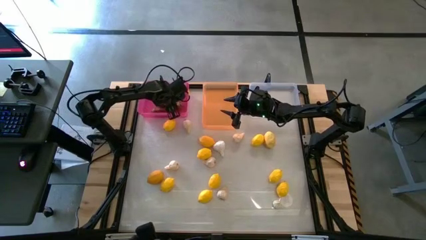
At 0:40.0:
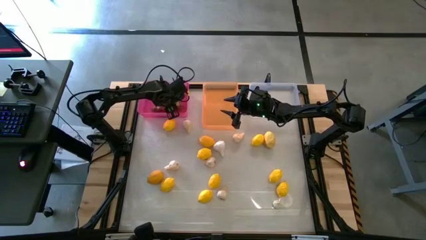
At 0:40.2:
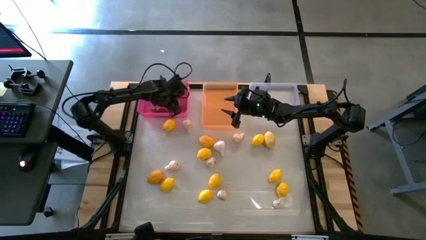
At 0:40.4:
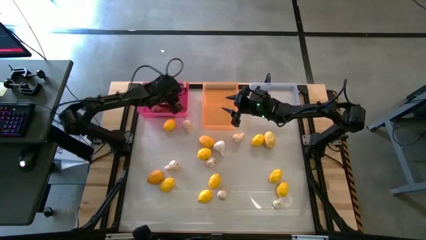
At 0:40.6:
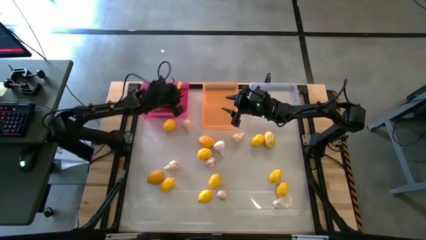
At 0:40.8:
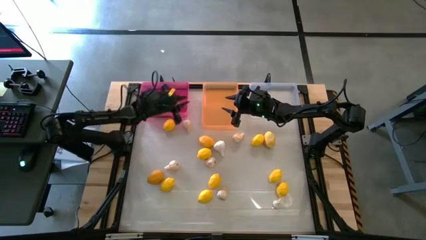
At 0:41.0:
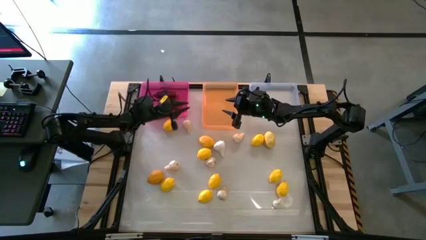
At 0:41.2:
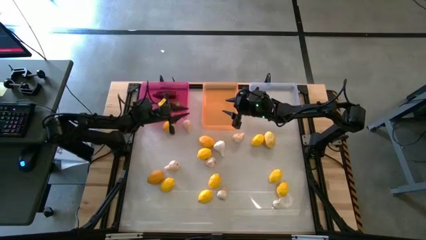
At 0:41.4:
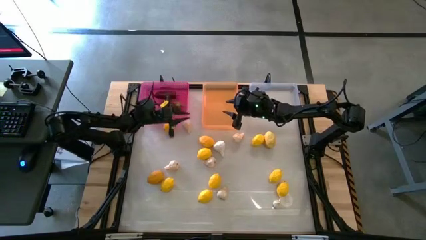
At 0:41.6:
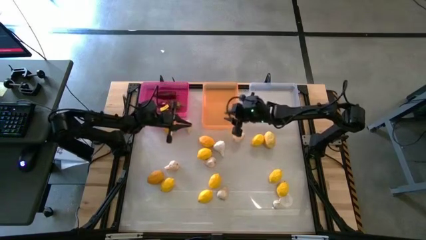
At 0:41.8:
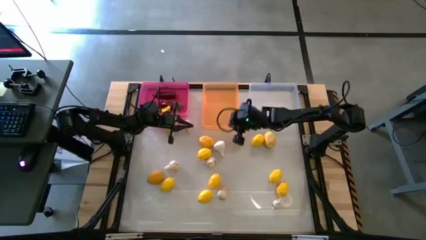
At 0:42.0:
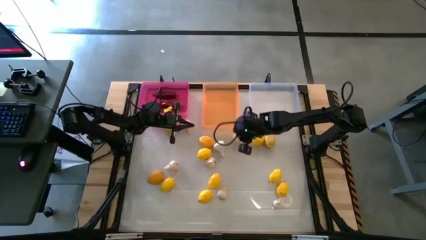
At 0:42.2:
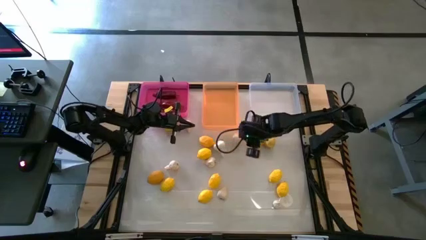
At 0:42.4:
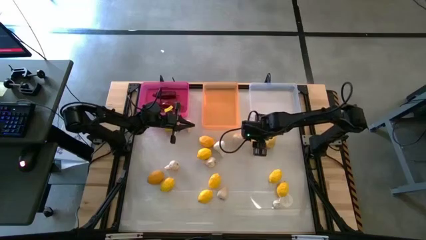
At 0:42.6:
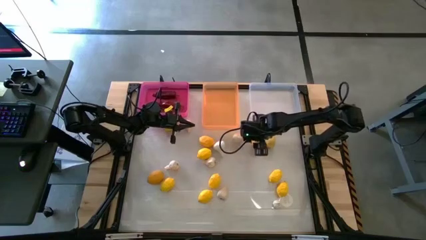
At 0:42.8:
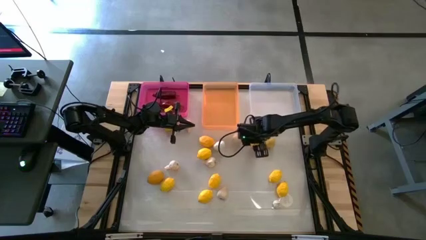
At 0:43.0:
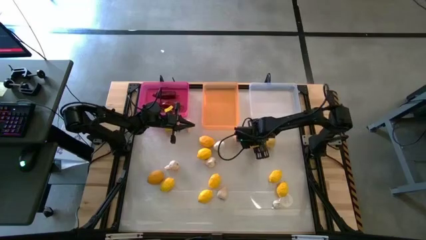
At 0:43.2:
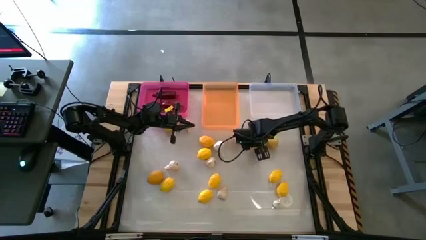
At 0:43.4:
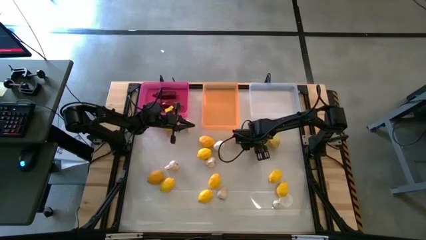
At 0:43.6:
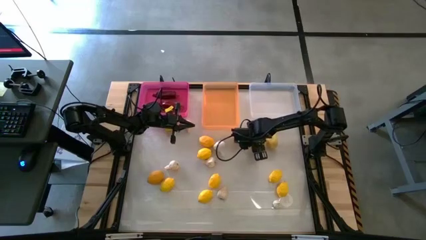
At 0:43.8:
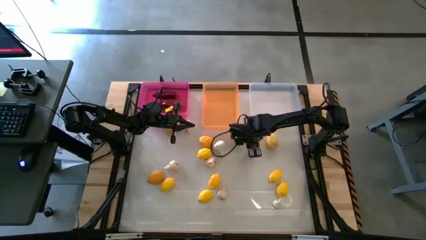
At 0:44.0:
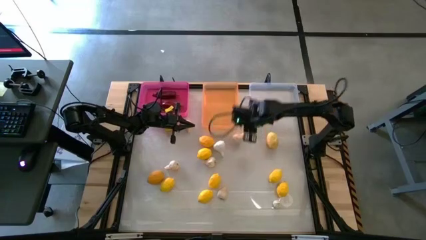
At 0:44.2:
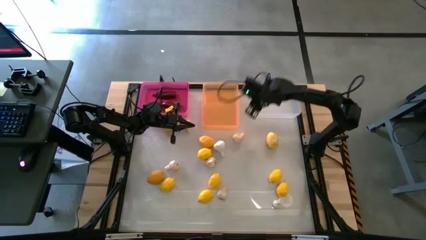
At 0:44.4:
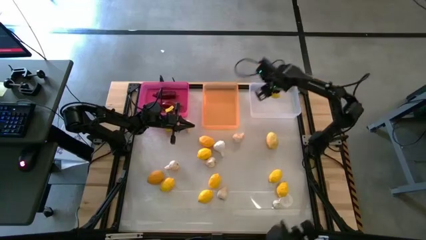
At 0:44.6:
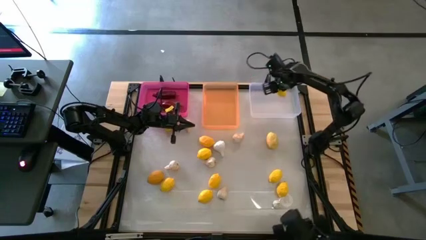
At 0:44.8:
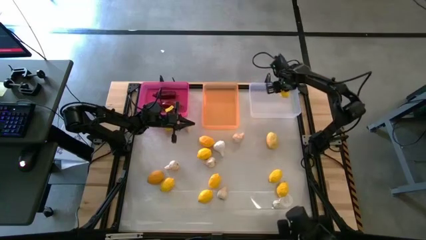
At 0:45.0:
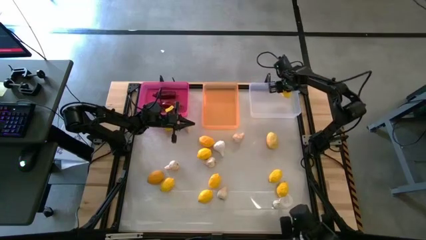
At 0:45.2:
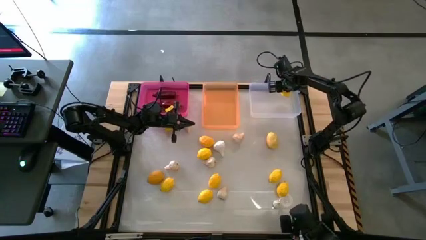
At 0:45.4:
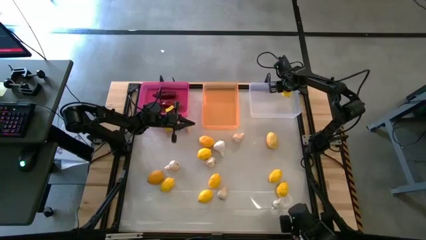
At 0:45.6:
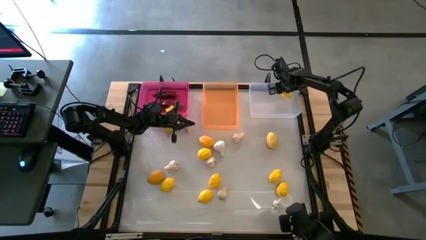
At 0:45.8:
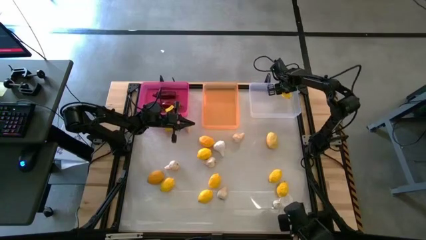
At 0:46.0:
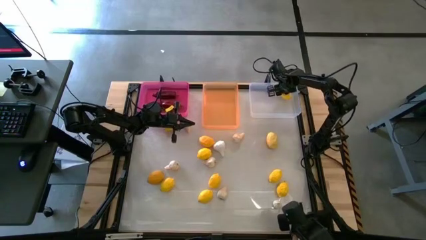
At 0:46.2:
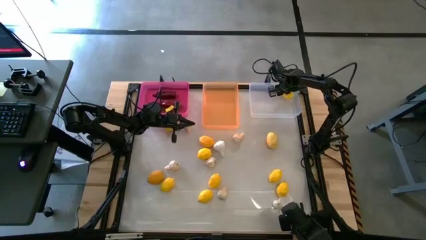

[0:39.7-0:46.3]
Task: Sort produce into baskets
Put the yellow lemon into the transparent bin

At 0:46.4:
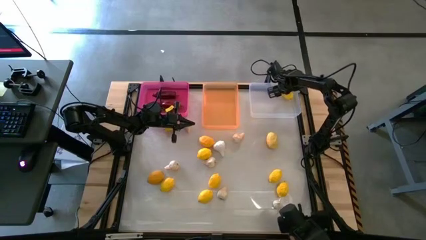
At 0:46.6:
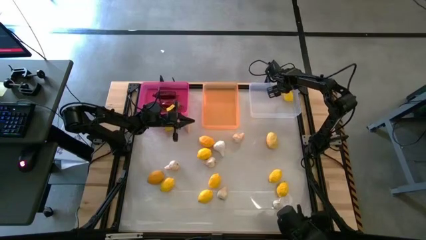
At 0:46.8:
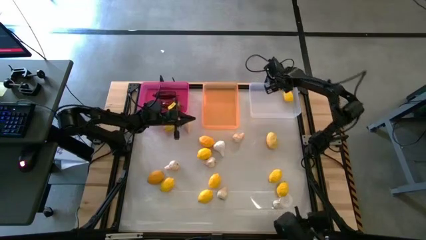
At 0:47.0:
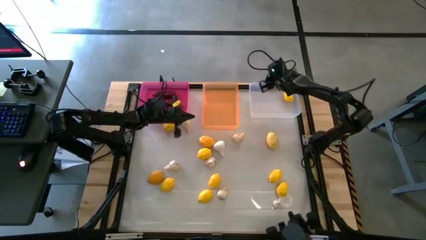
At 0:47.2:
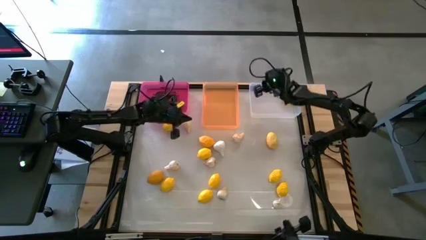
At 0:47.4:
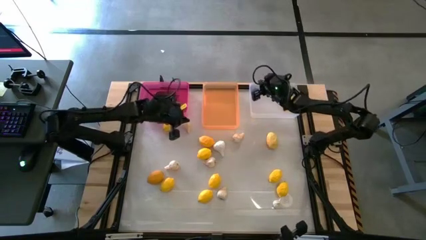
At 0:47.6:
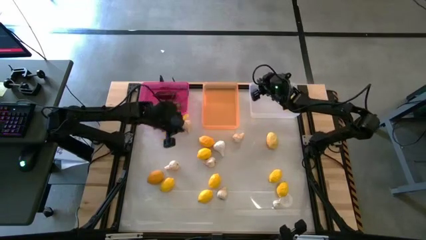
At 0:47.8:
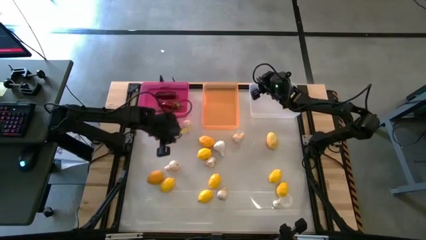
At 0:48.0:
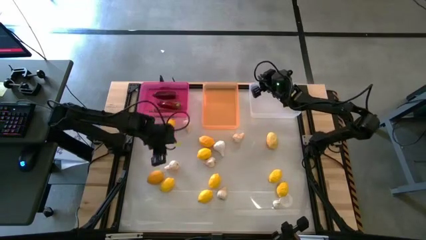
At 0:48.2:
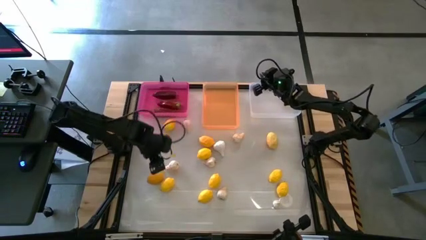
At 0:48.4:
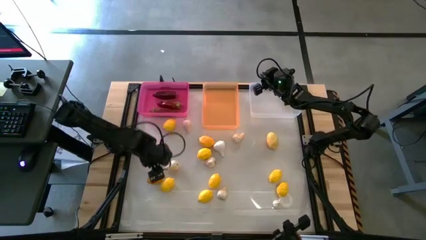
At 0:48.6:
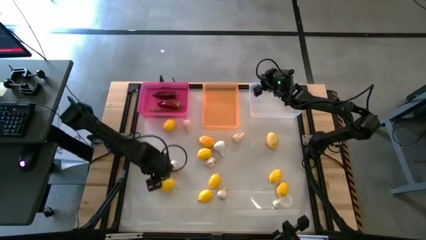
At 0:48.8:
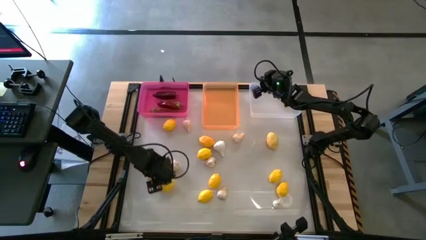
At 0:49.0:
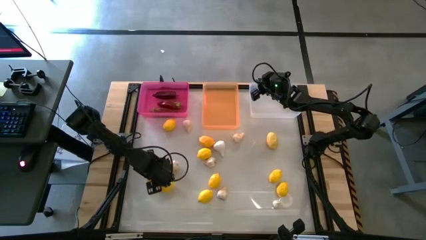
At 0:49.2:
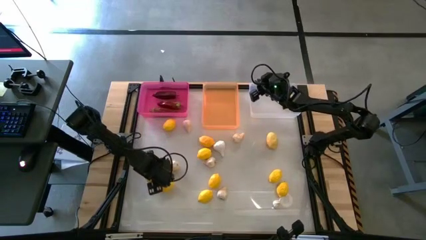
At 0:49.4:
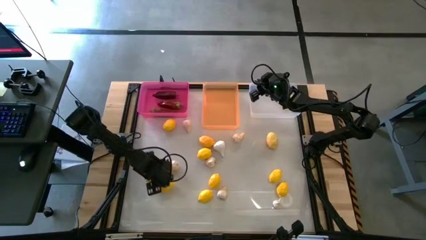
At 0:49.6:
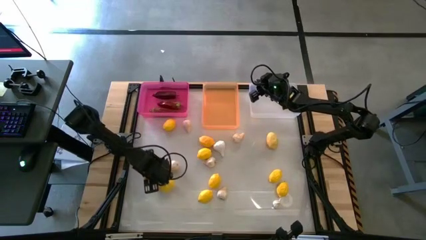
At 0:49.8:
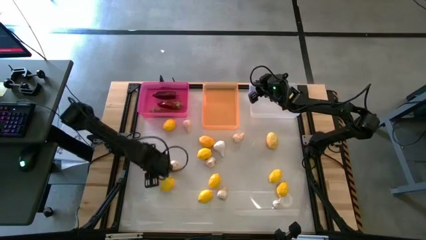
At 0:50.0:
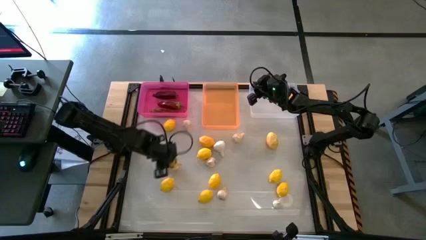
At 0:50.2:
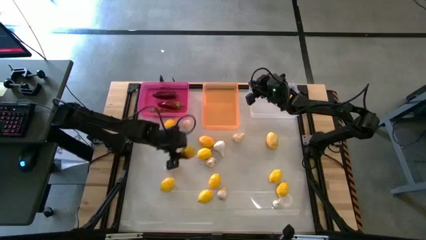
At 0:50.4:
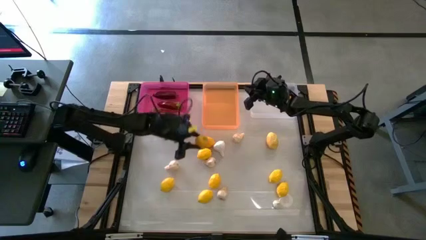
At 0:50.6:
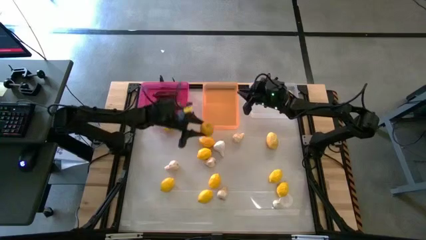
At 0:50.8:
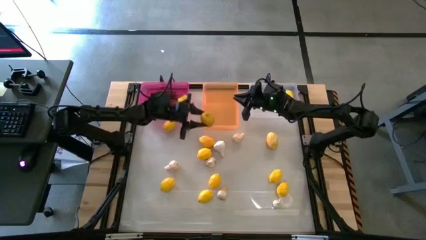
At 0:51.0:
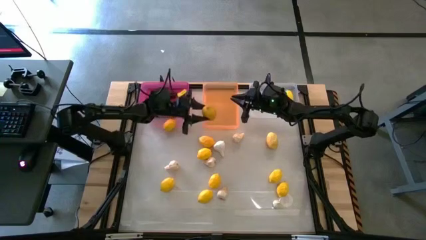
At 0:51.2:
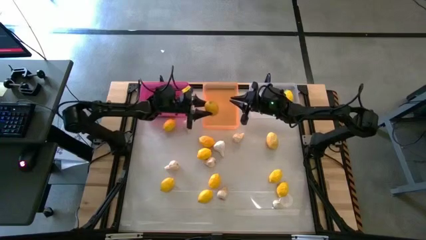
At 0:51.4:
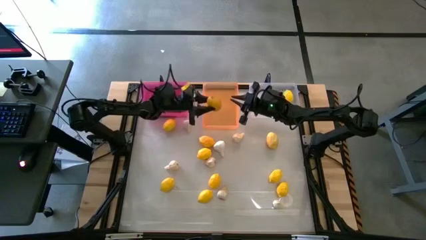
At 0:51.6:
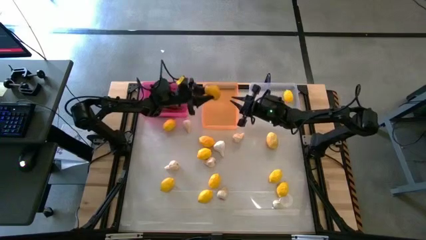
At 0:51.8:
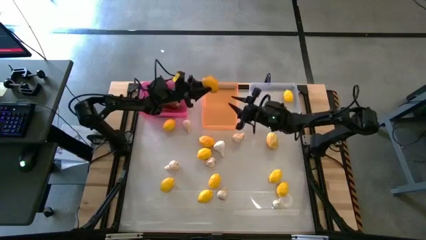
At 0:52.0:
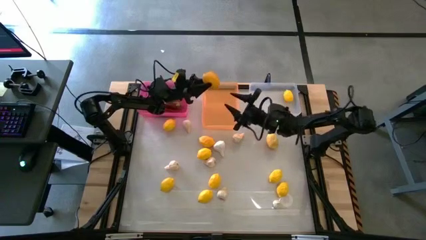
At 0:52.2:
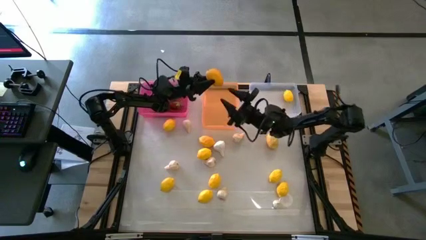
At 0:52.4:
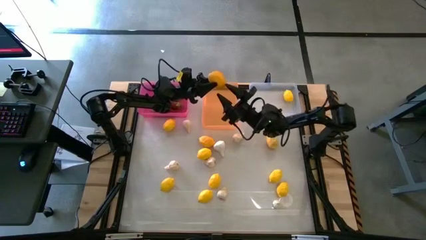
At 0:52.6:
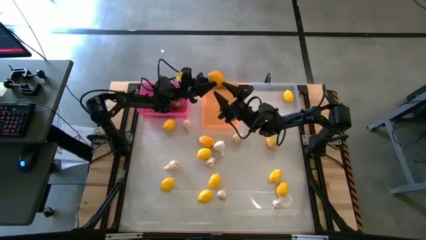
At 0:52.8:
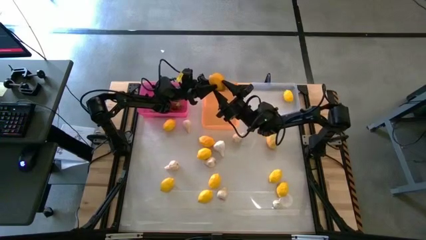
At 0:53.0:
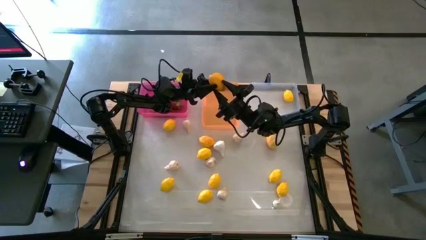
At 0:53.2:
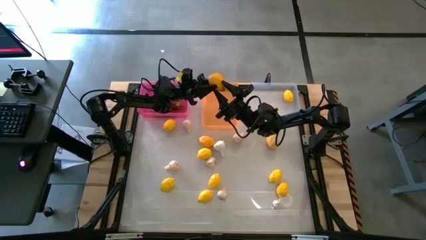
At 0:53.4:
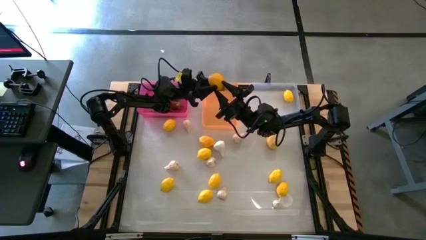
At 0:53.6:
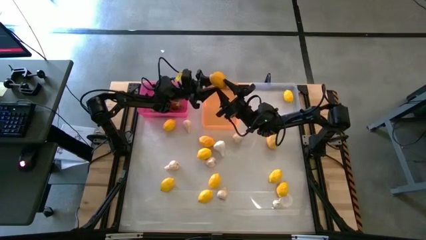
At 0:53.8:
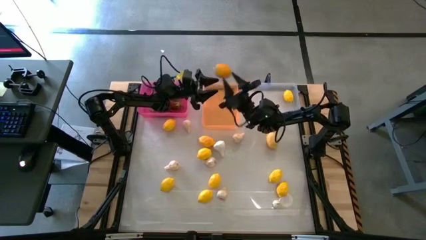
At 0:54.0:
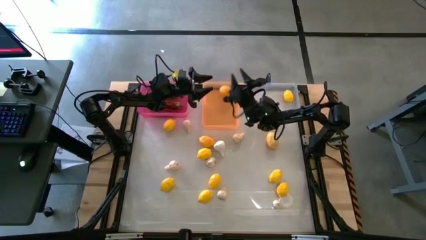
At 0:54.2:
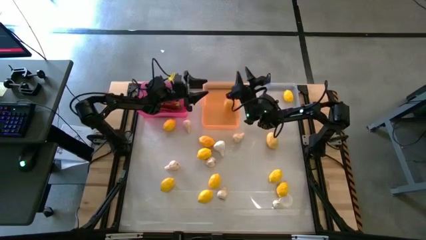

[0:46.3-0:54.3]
Put the yellow lemon into the transparent bin

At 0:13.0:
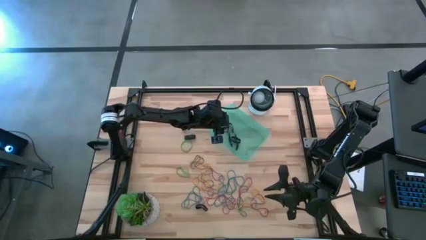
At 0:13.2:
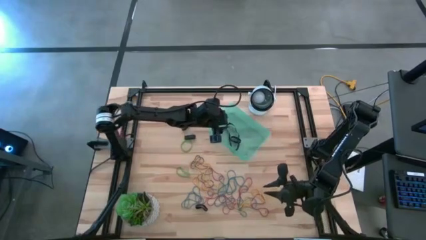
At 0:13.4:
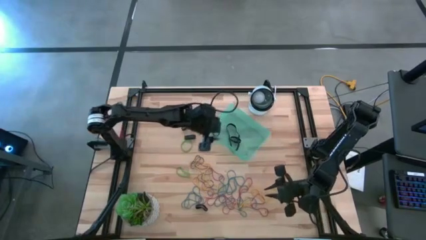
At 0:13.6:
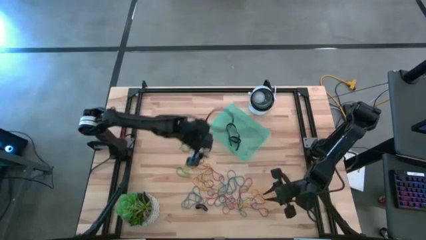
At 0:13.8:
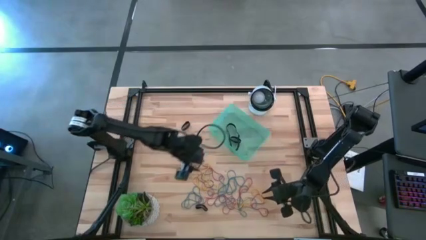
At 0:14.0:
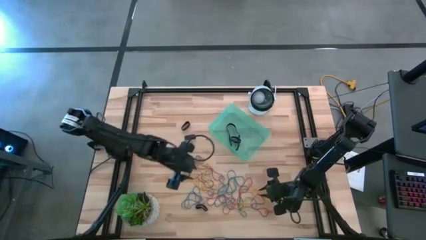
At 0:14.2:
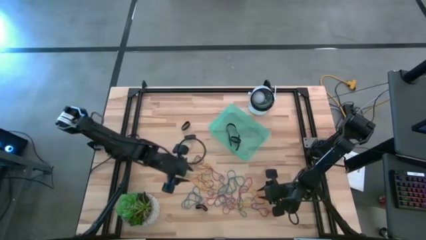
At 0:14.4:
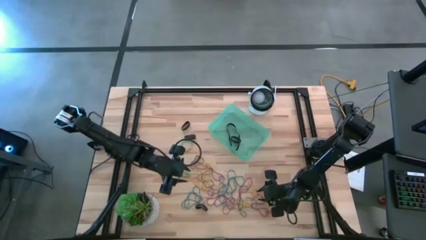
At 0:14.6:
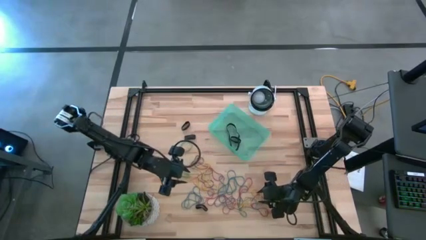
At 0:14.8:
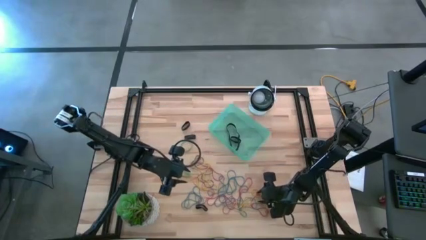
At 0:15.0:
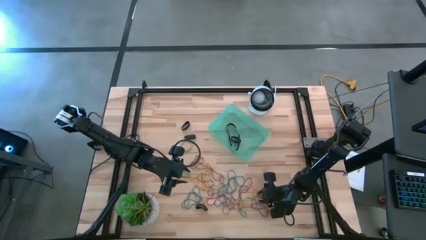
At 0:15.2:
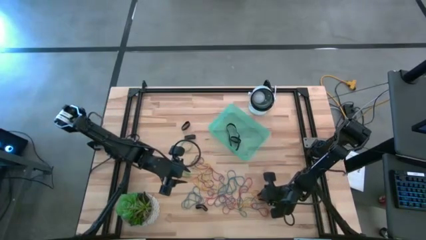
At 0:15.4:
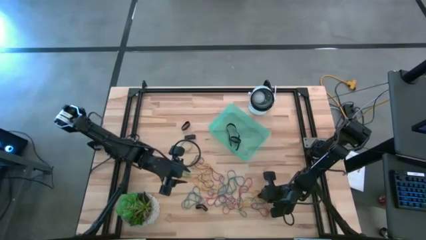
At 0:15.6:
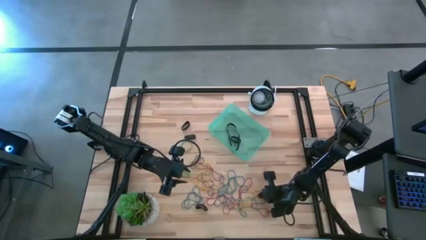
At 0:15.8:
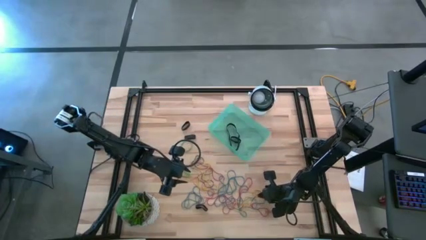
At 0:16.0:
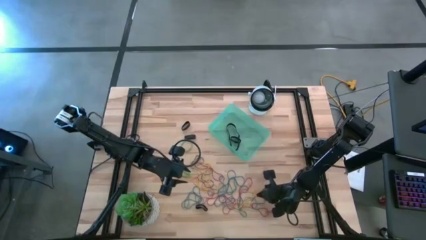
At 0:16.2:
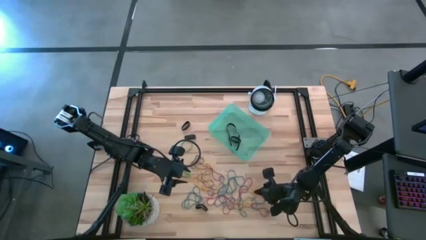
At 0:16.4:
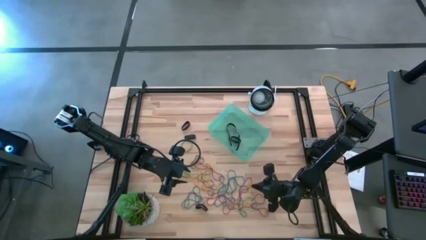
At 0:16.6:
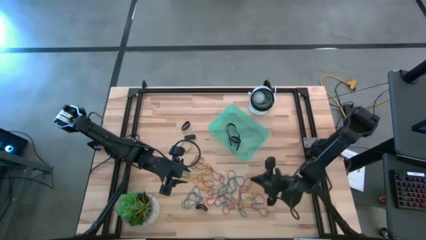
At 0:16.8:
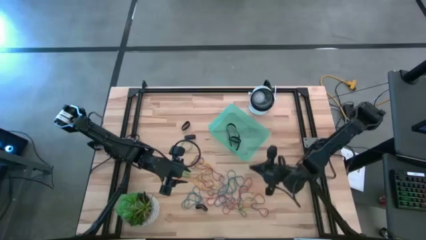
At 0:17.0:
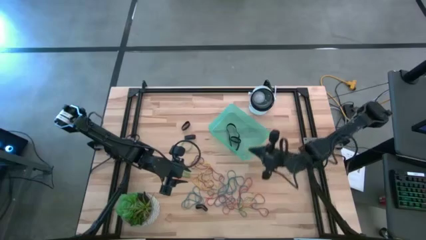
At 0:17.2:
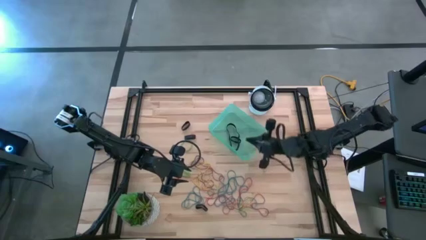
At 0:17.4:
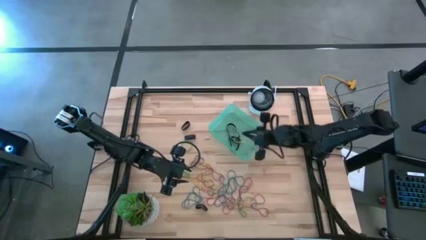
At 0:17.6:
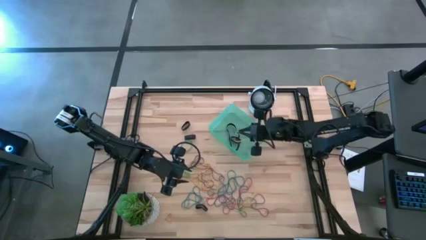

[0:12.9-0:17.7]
Task: Pick and place rubber bands into bin
Put the yellow rubber band into the blue bin
